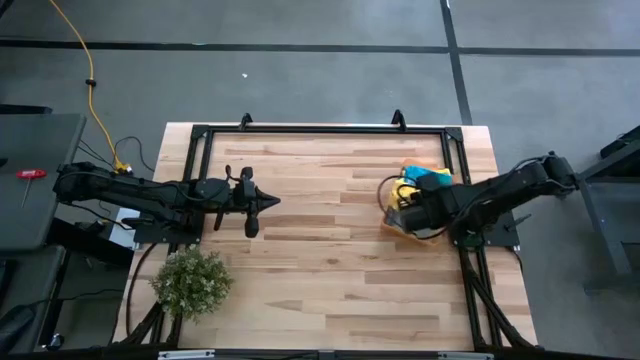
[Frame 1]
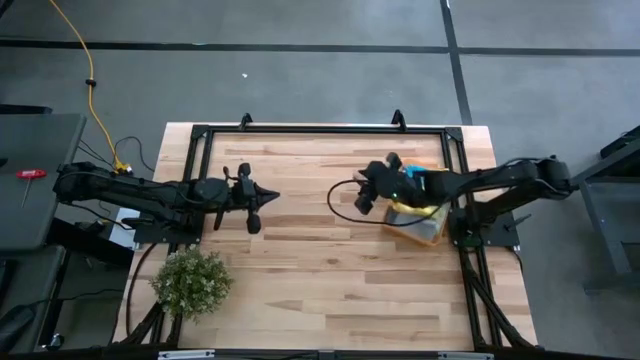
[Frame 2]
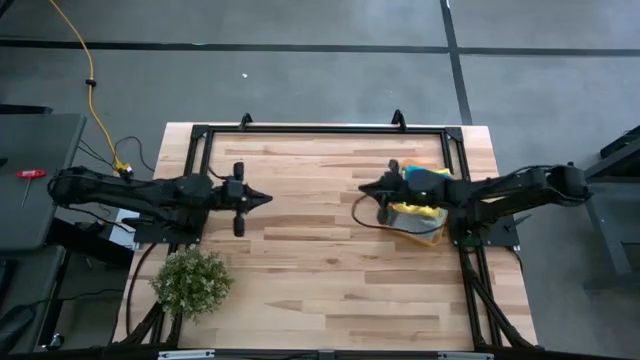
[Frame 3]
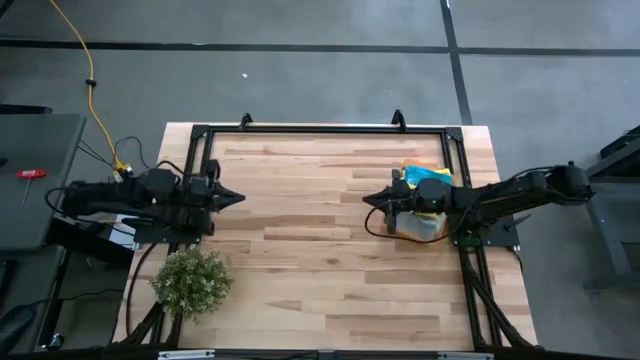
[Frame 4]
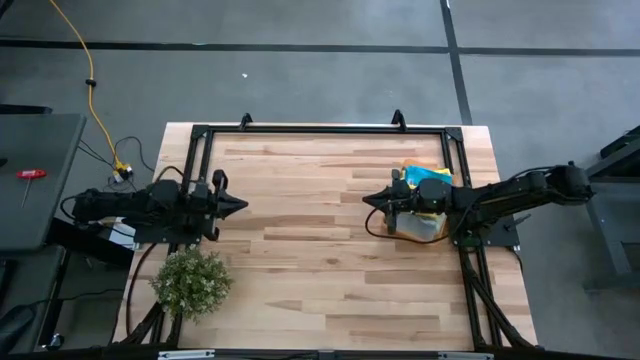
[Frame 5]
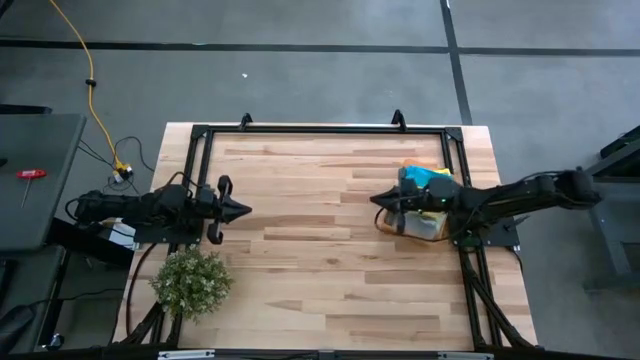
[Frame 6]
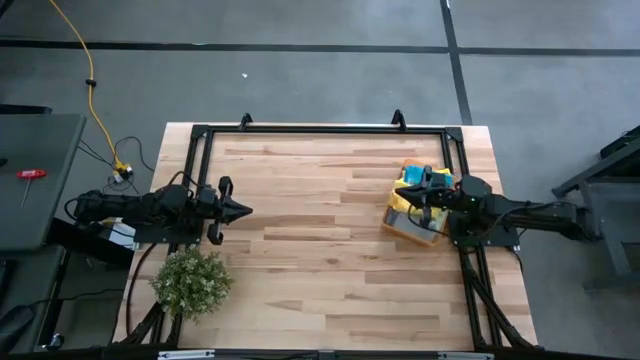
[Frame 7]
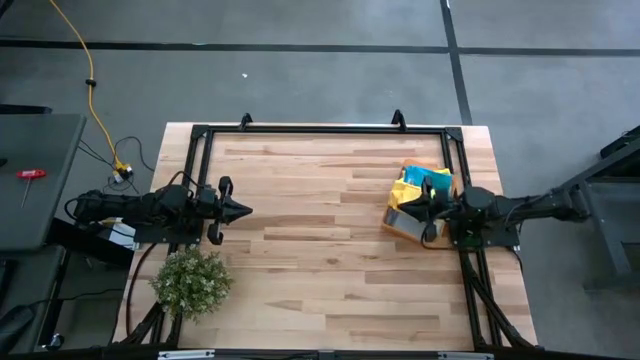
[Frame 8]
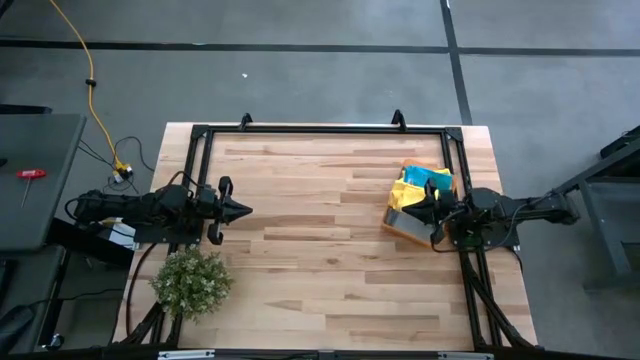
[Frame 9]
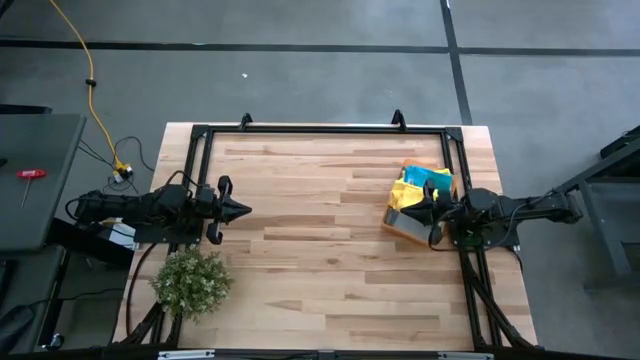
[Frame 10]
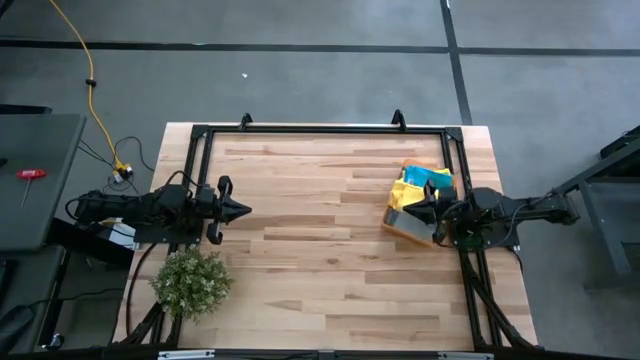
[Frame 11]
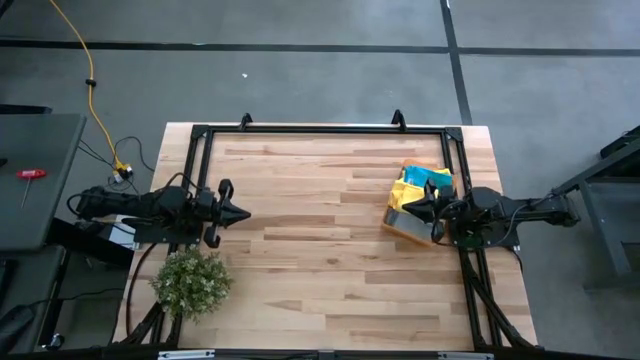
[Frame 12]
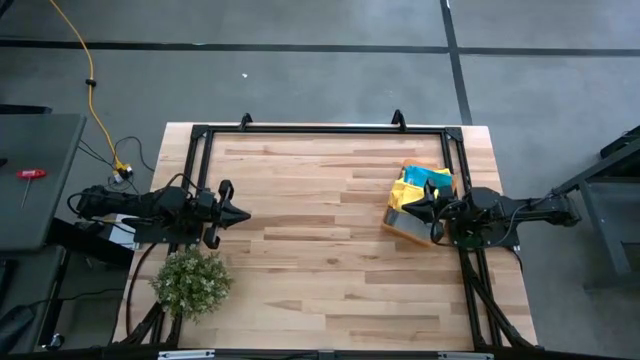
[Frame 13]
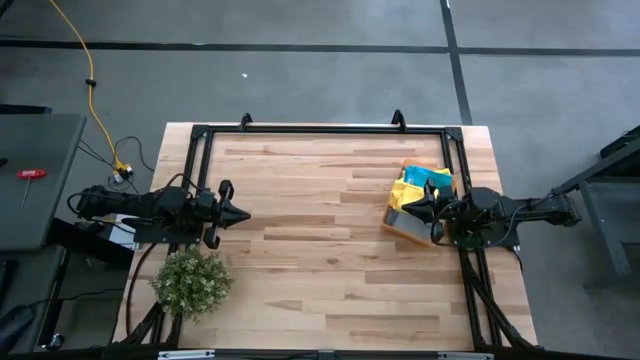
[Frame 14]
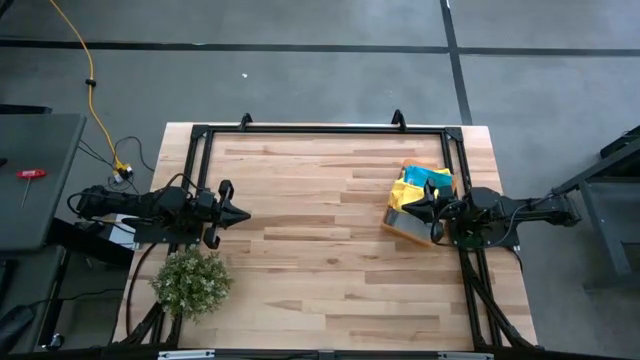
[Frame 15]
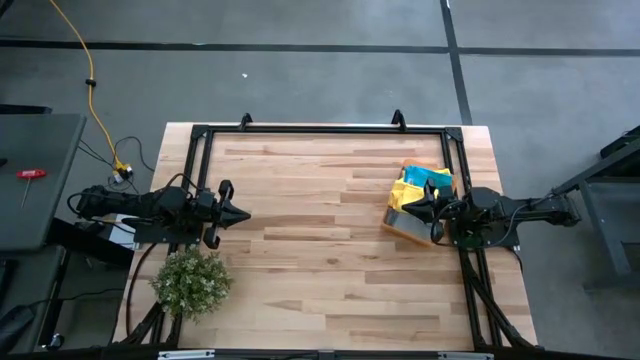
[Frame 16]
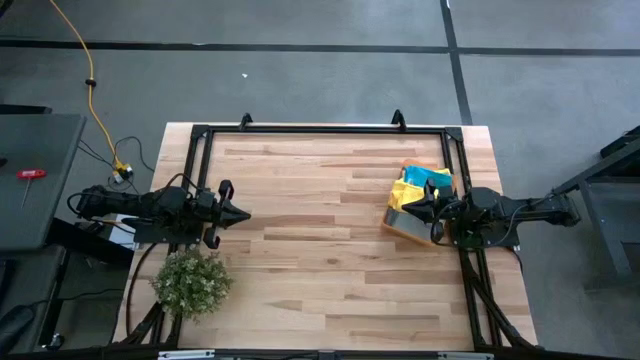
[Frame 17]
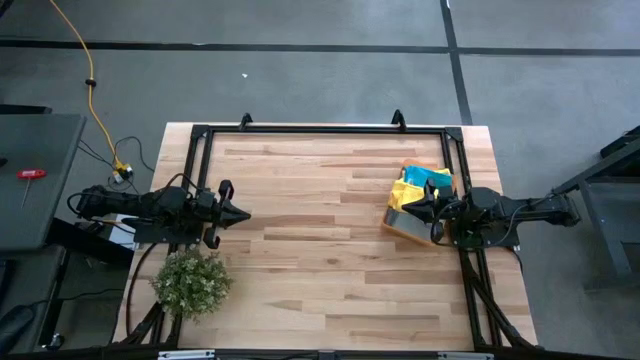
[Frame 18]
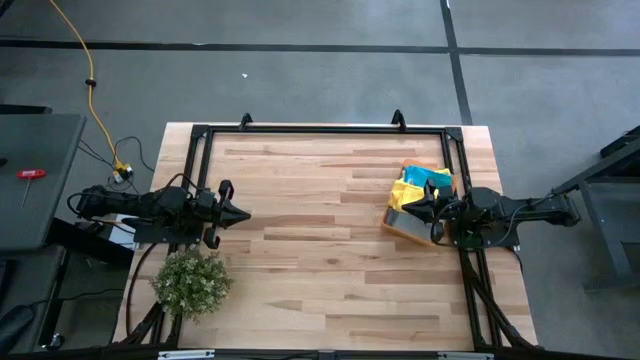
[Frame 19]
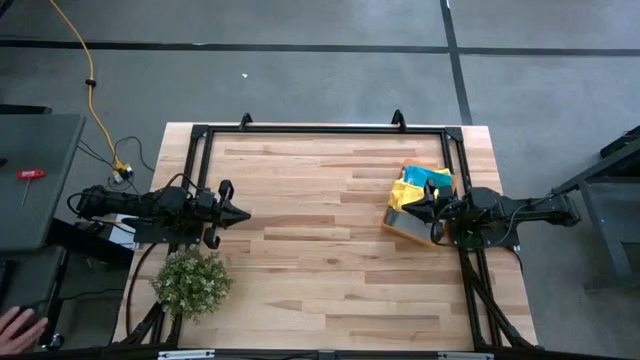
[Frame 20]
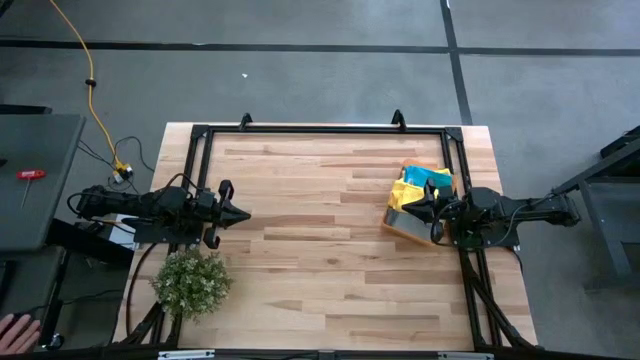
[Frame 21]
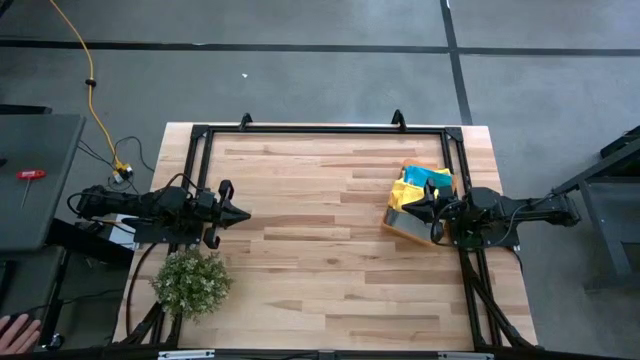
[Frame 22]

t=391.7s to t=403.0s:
Task: Fold microfiber towels
Return to Home Position

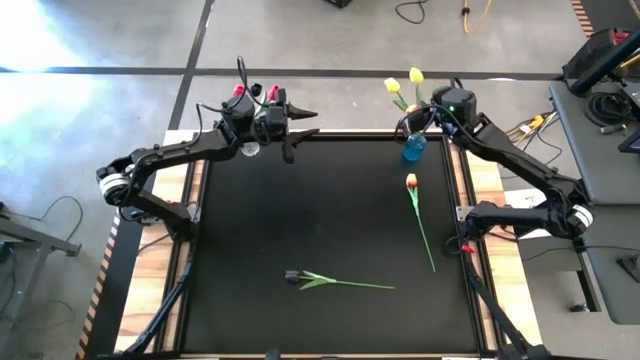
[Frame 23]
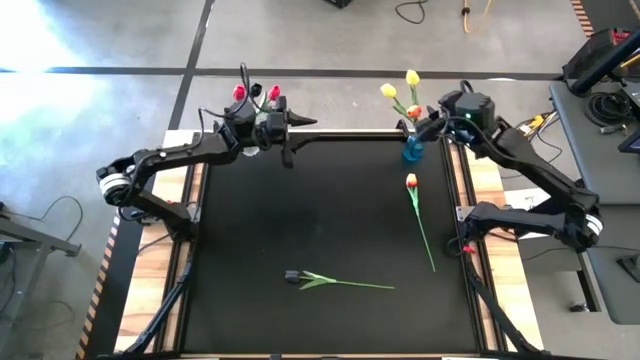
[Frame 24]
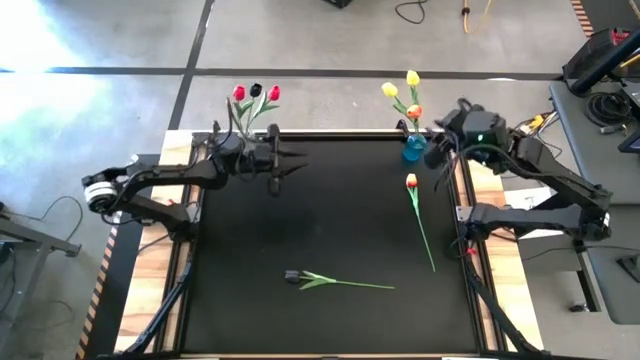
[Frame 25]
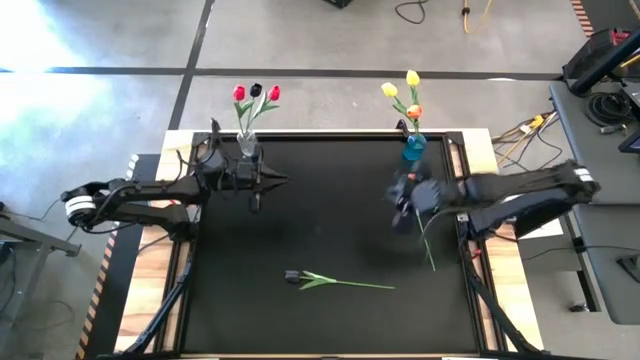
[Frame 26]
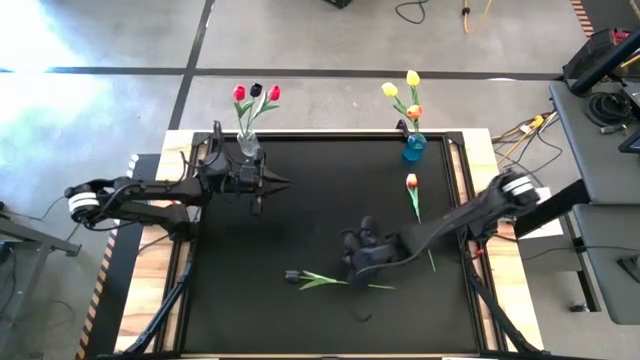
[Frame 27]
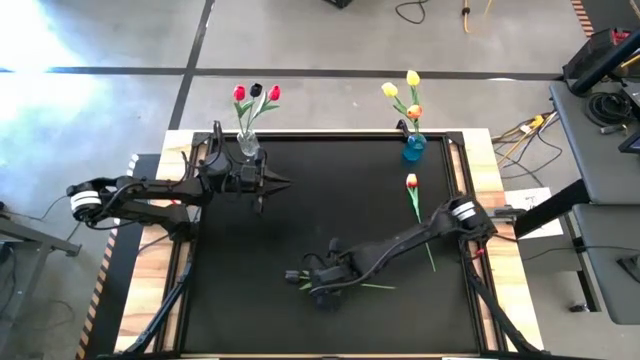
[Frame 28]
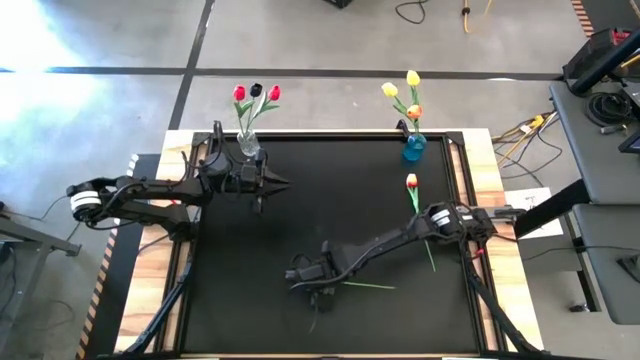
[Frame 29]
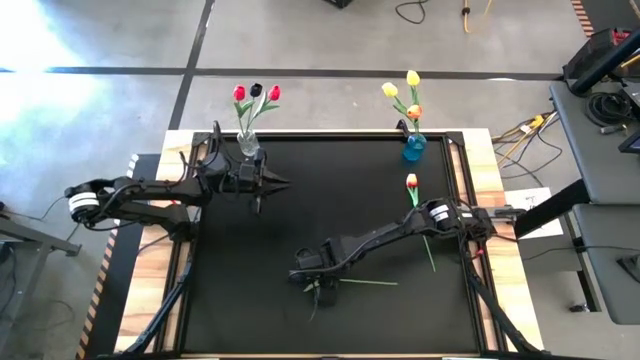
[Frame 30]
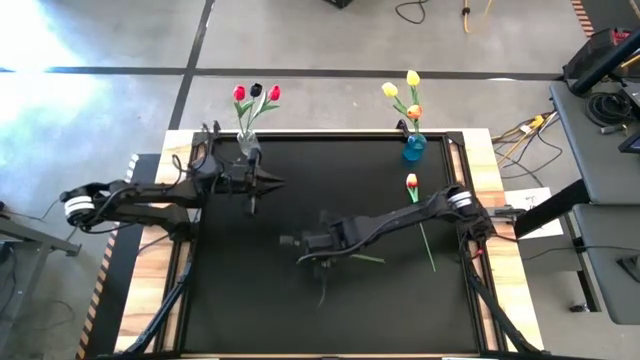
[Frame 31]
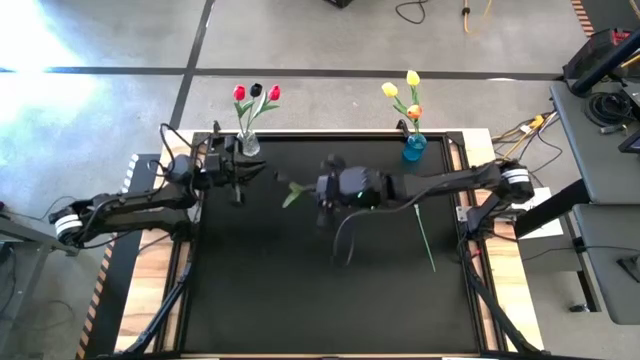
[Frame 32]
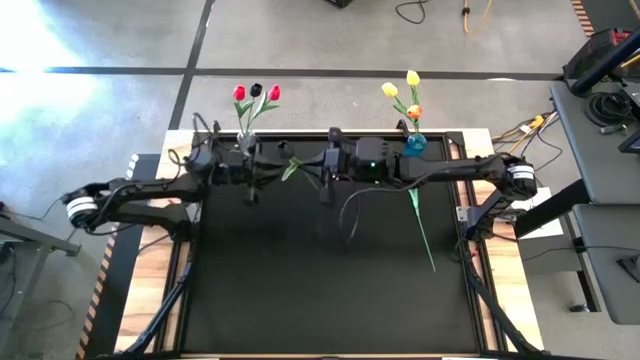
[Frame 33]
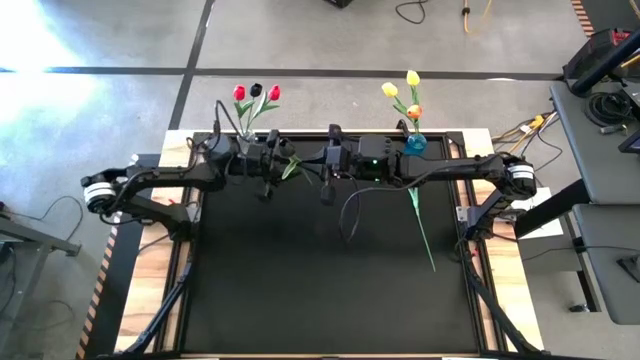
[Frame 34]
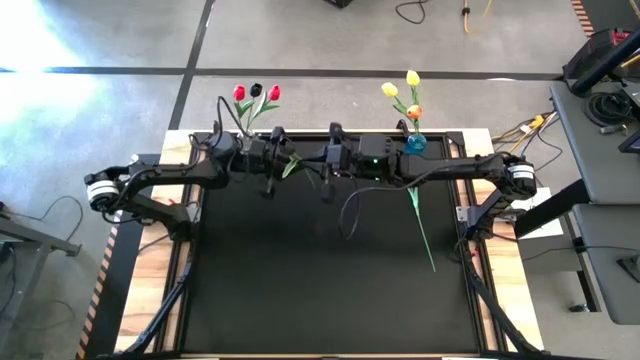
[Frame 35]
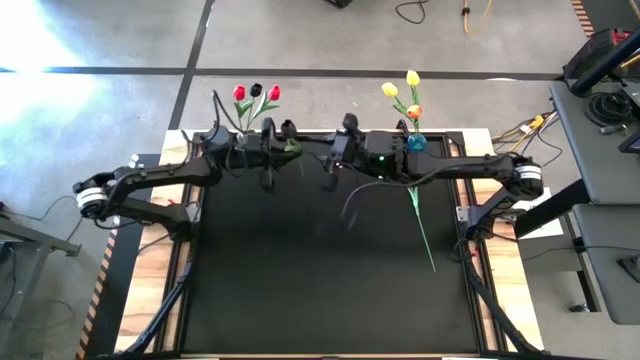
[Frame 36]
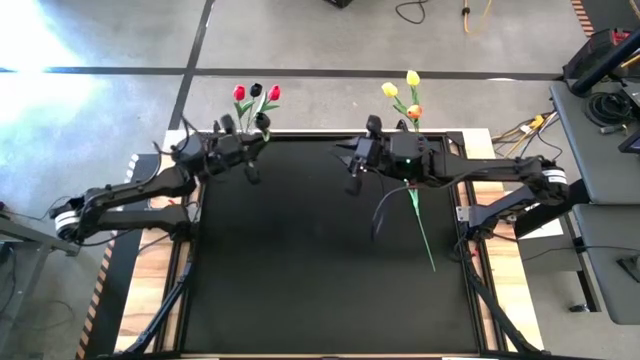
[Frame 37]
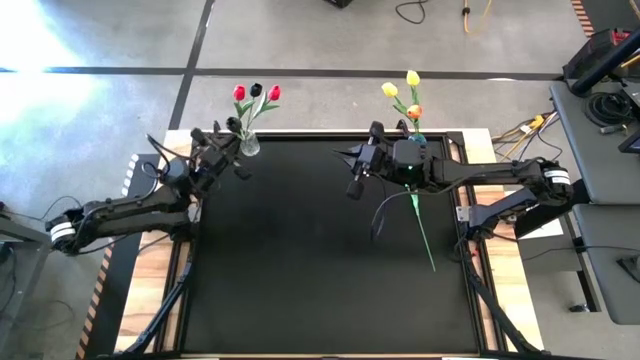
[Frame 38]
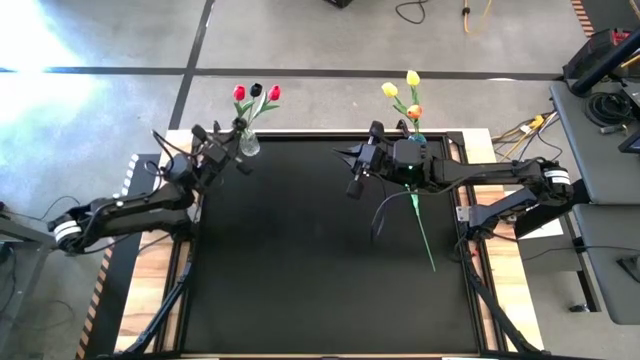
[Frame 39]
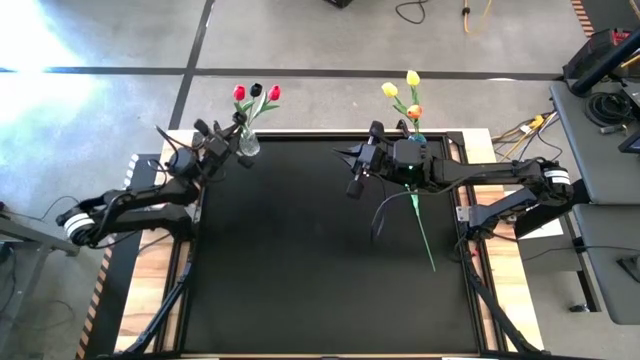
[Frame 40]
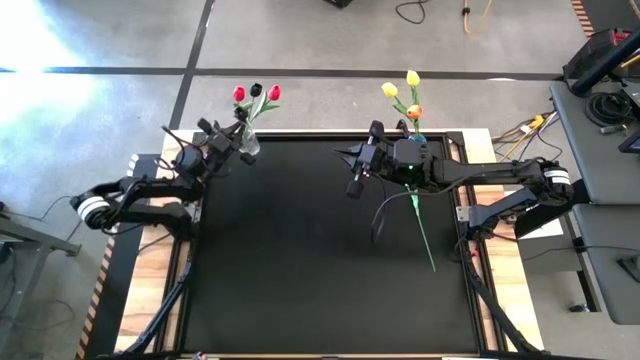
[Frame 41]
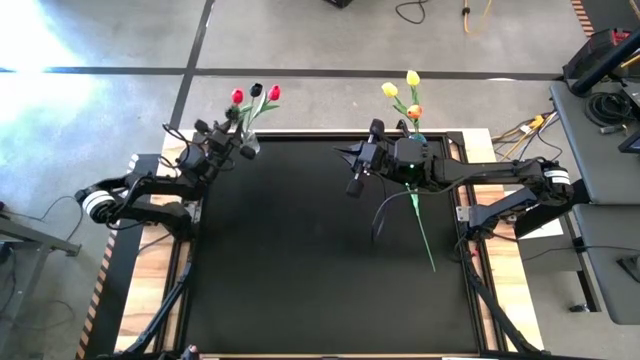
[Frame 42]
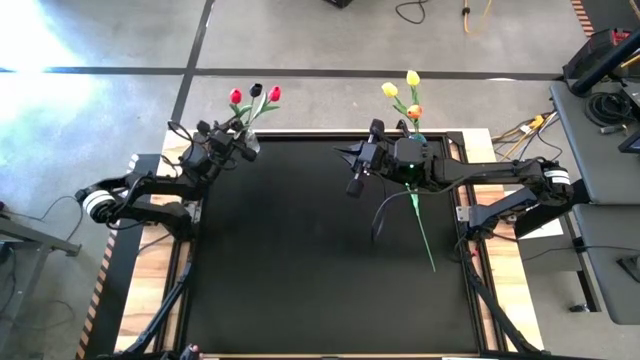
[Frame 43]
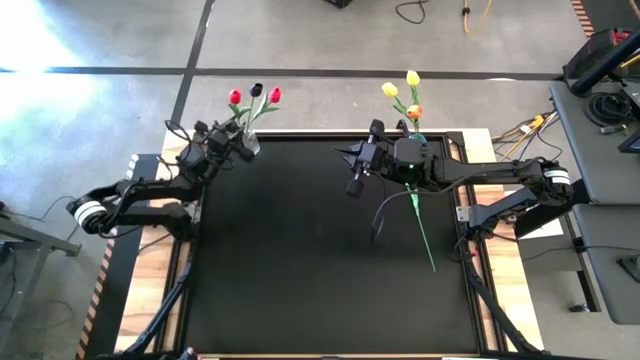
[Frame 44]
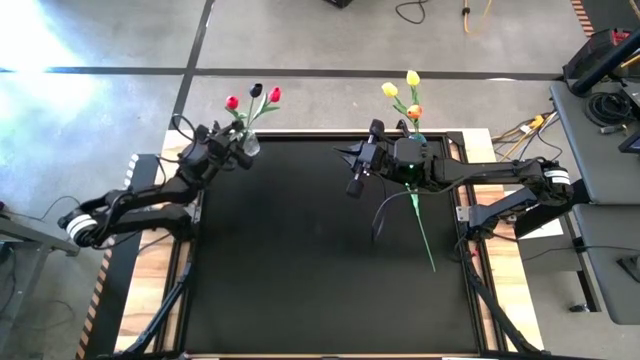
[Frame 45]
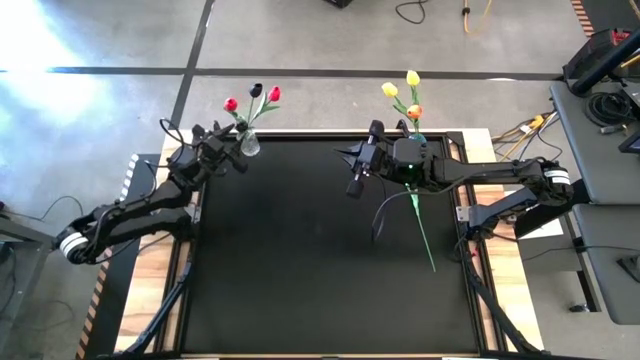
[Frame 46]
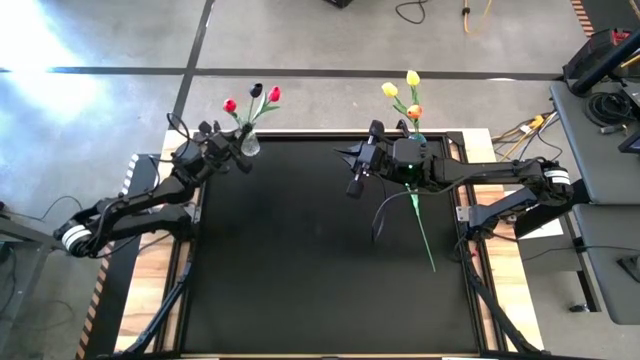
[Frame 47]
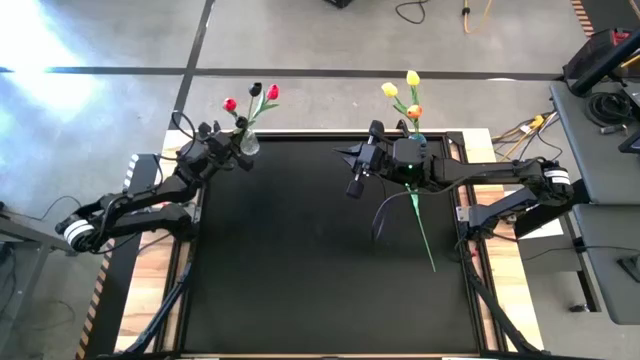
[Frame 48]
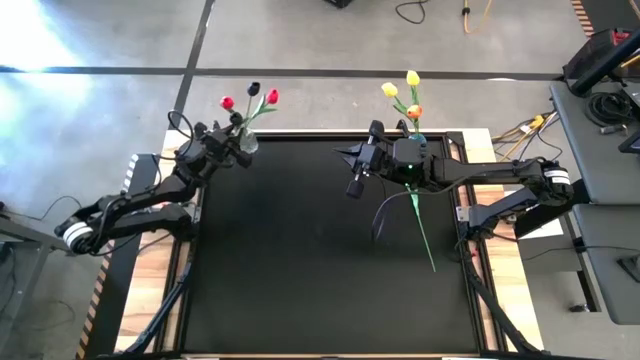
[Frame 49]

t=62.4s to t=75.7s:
Task: Sort flowers into vase by color
Put the black tulip into the transparent flower vase
